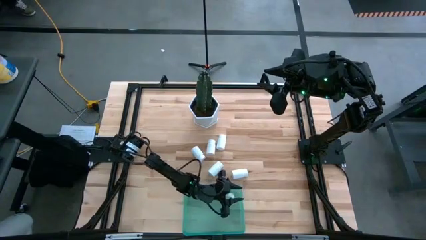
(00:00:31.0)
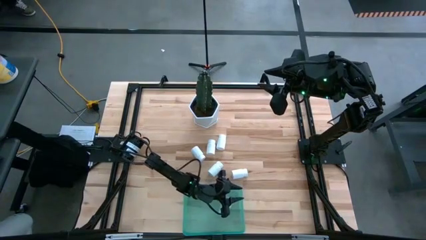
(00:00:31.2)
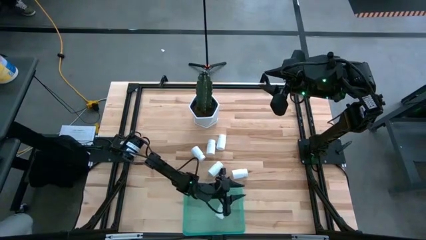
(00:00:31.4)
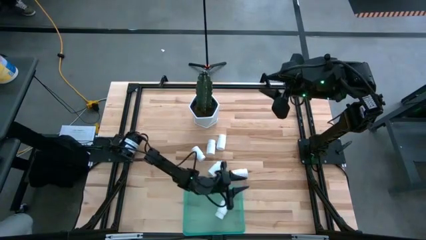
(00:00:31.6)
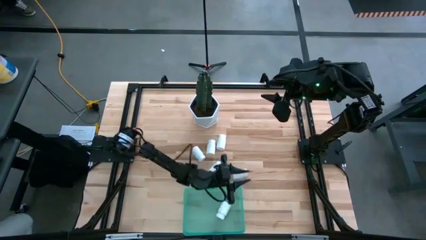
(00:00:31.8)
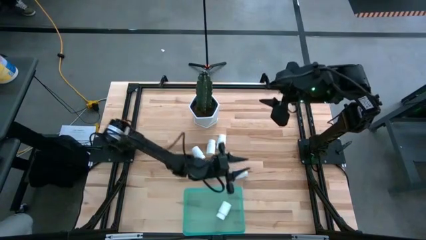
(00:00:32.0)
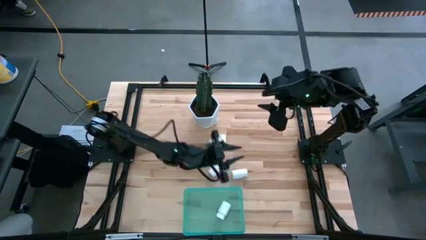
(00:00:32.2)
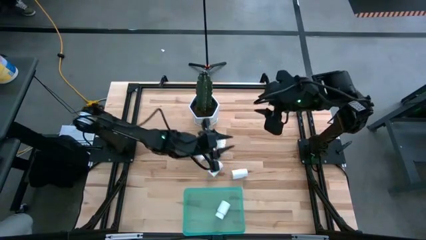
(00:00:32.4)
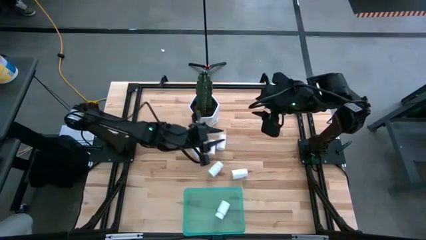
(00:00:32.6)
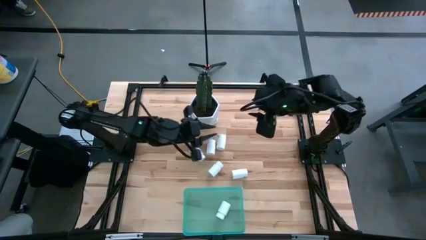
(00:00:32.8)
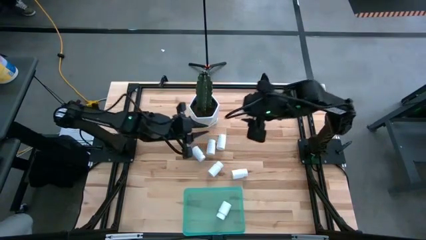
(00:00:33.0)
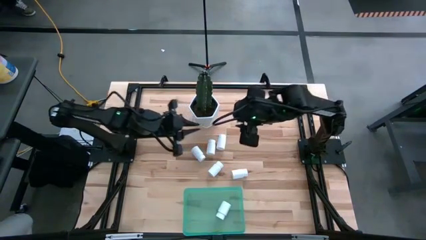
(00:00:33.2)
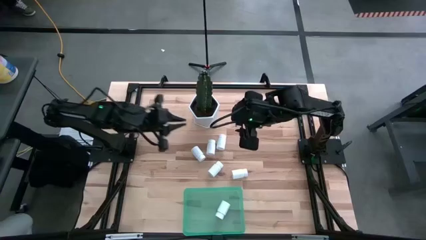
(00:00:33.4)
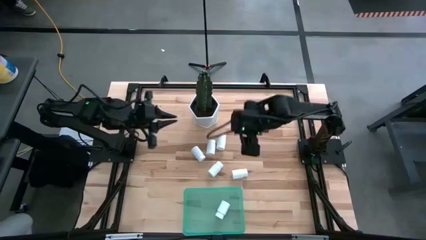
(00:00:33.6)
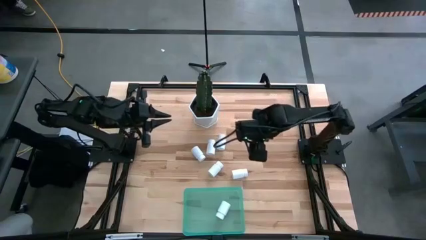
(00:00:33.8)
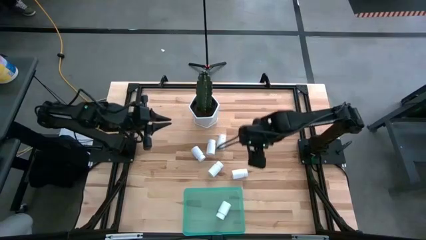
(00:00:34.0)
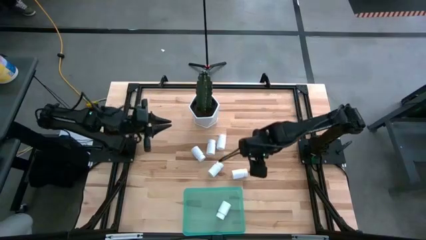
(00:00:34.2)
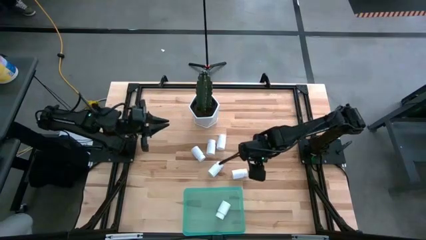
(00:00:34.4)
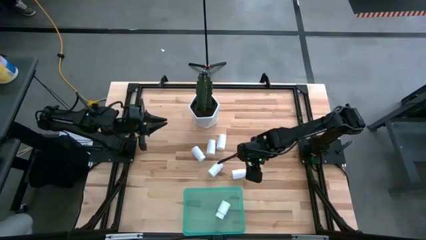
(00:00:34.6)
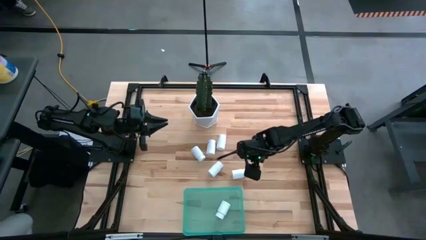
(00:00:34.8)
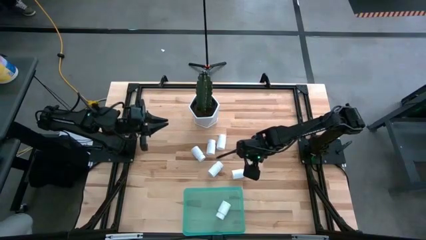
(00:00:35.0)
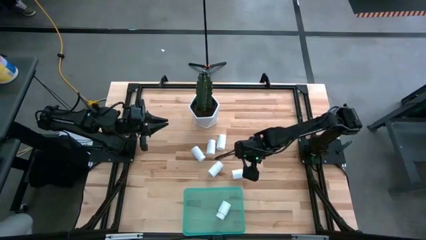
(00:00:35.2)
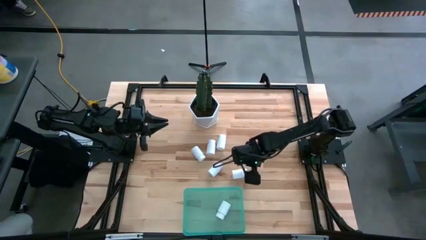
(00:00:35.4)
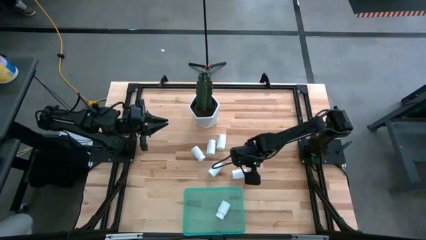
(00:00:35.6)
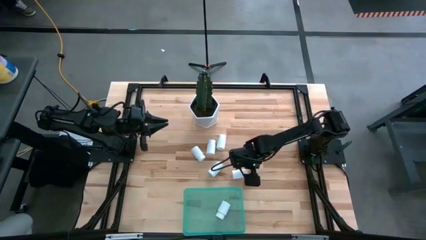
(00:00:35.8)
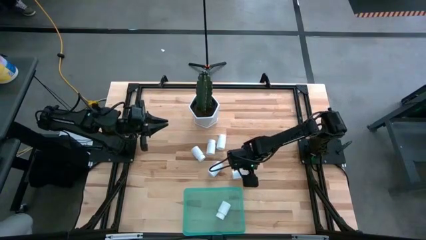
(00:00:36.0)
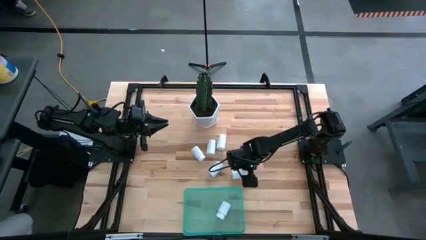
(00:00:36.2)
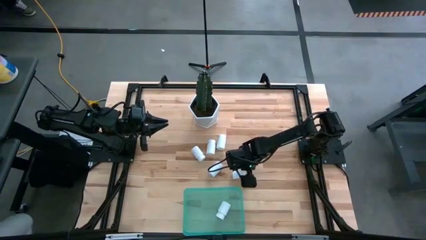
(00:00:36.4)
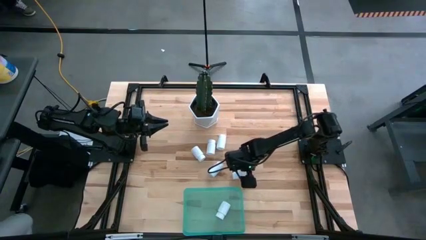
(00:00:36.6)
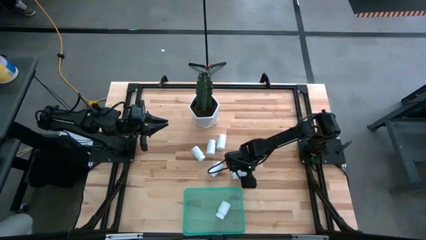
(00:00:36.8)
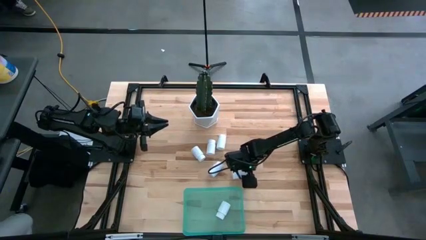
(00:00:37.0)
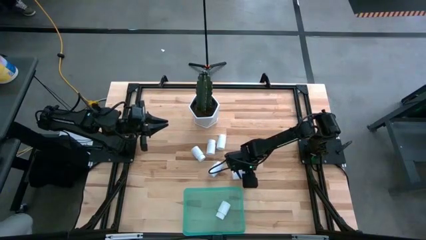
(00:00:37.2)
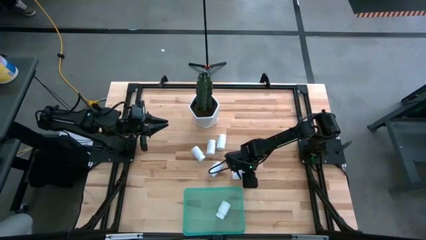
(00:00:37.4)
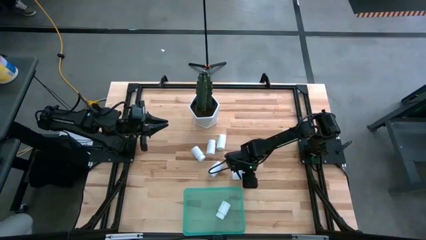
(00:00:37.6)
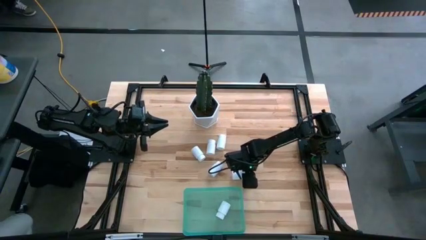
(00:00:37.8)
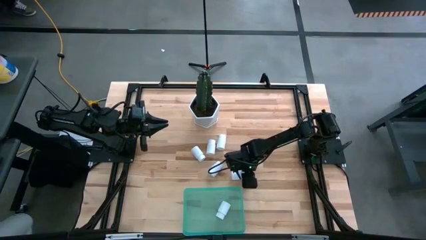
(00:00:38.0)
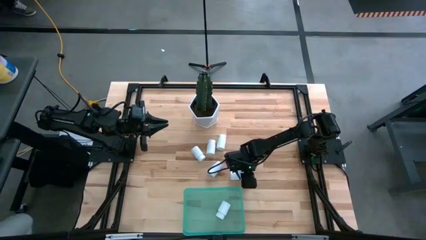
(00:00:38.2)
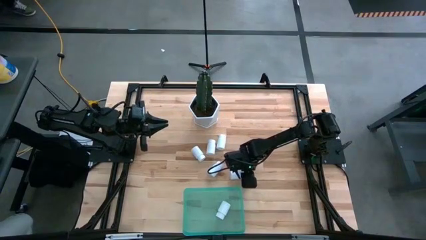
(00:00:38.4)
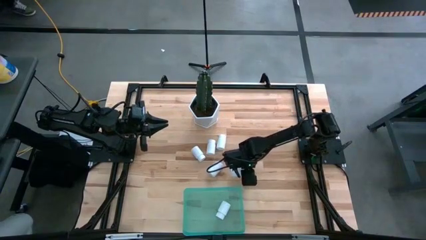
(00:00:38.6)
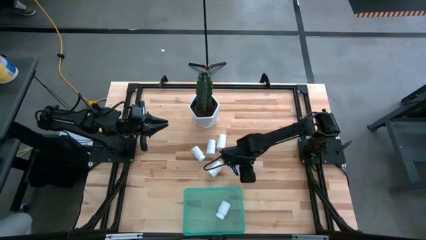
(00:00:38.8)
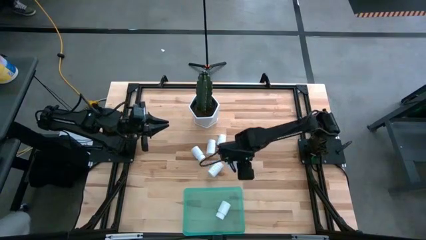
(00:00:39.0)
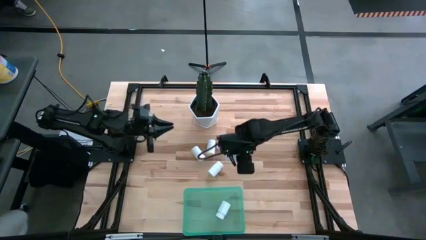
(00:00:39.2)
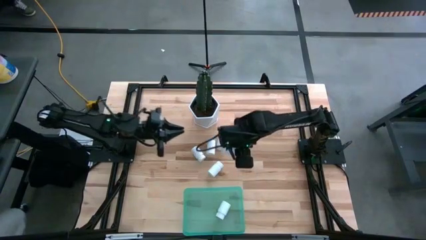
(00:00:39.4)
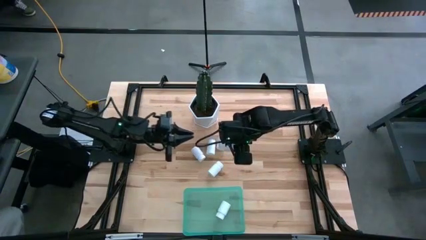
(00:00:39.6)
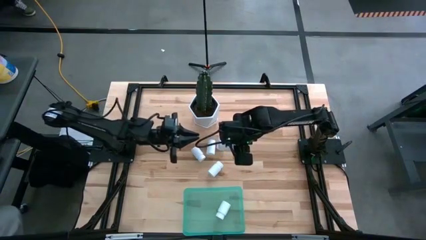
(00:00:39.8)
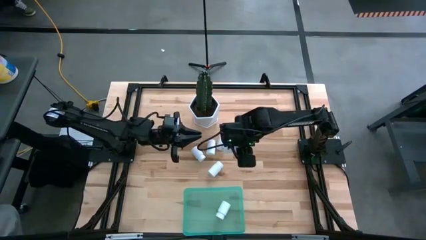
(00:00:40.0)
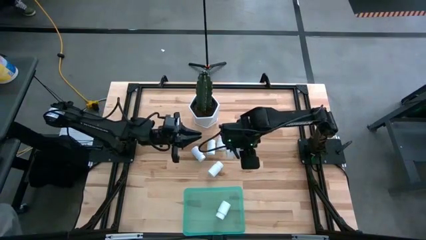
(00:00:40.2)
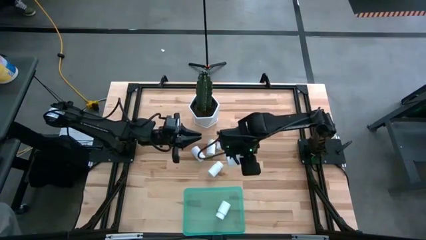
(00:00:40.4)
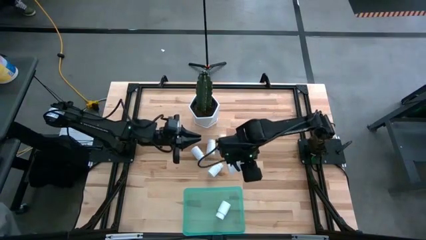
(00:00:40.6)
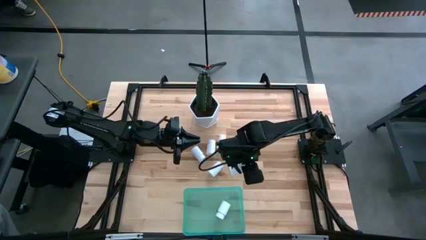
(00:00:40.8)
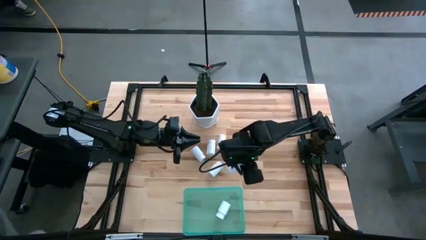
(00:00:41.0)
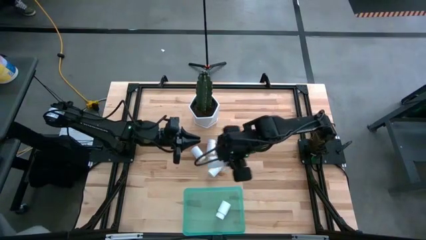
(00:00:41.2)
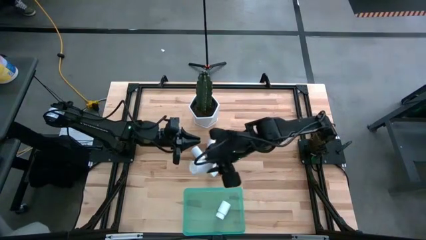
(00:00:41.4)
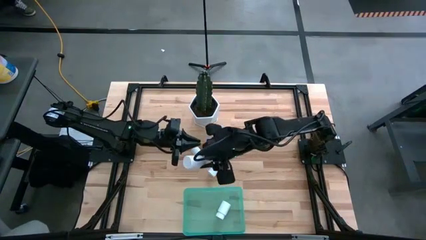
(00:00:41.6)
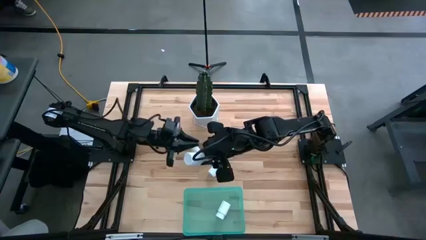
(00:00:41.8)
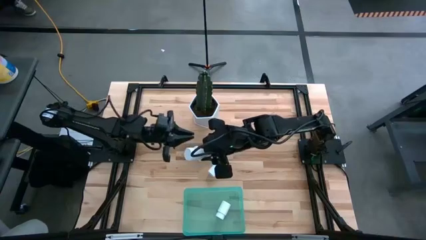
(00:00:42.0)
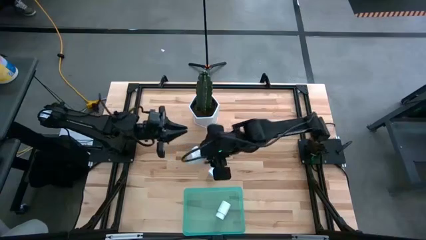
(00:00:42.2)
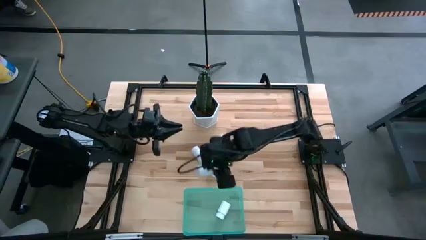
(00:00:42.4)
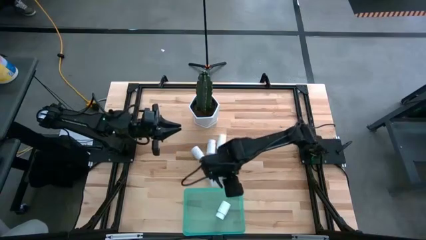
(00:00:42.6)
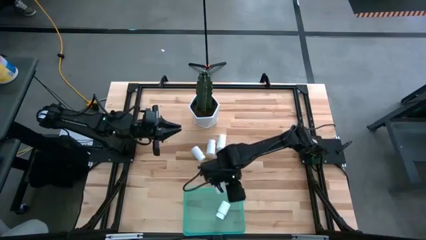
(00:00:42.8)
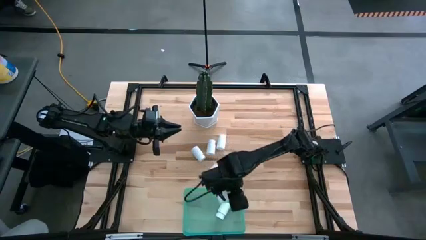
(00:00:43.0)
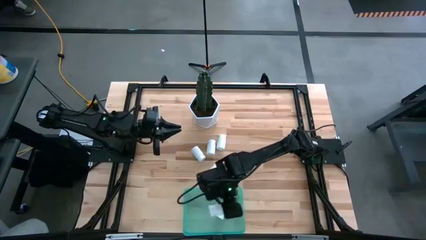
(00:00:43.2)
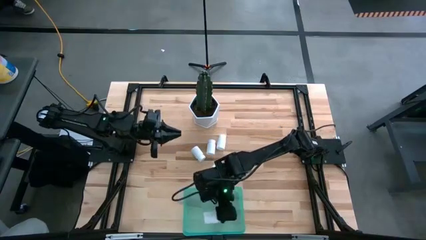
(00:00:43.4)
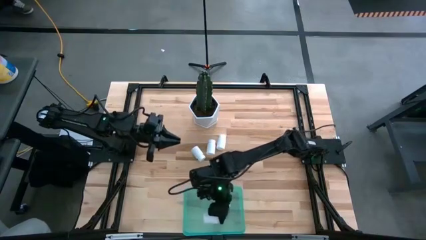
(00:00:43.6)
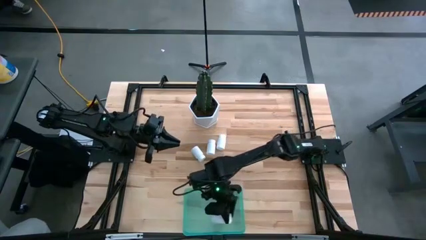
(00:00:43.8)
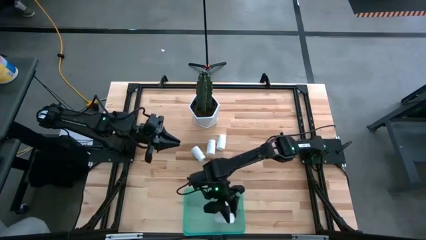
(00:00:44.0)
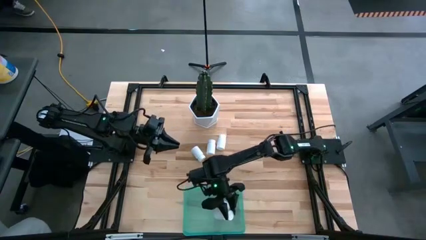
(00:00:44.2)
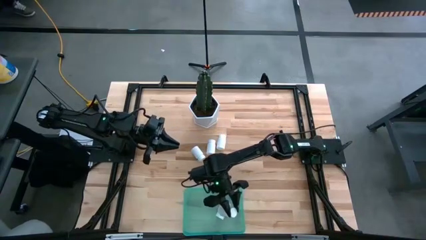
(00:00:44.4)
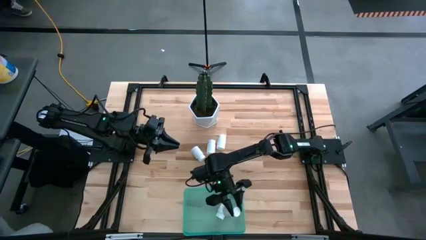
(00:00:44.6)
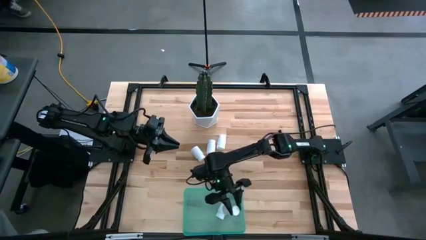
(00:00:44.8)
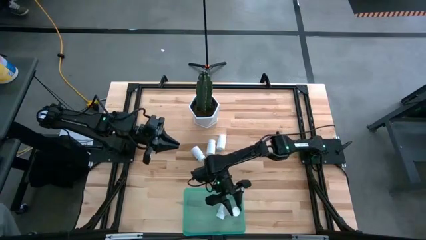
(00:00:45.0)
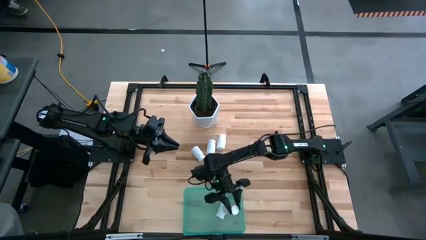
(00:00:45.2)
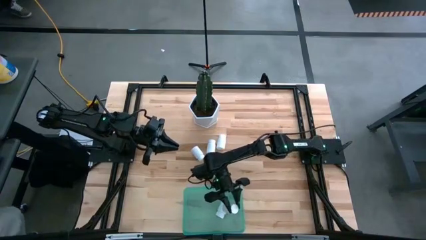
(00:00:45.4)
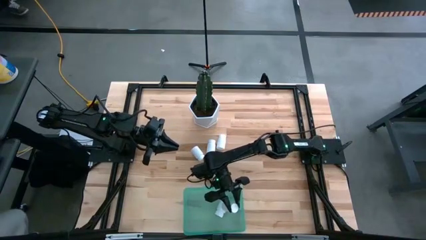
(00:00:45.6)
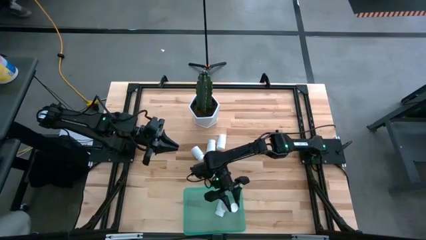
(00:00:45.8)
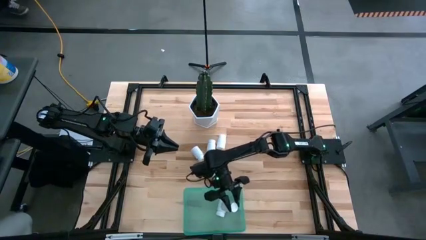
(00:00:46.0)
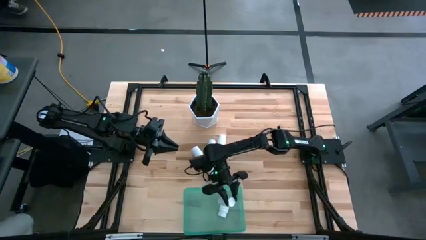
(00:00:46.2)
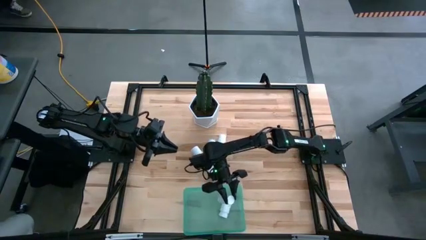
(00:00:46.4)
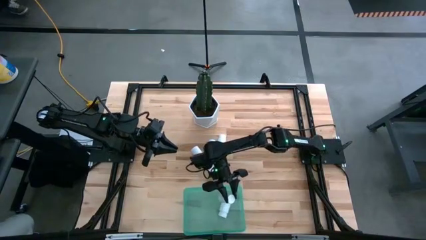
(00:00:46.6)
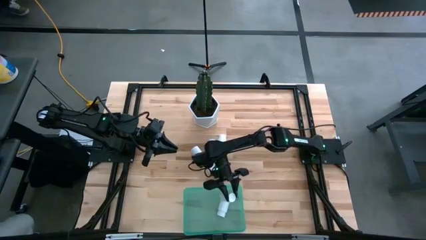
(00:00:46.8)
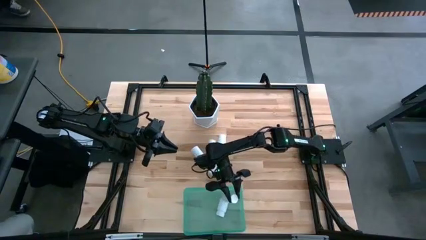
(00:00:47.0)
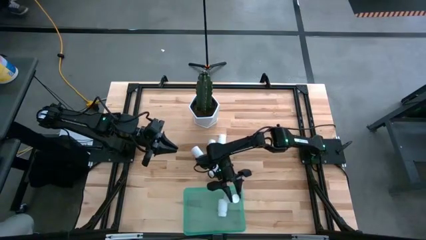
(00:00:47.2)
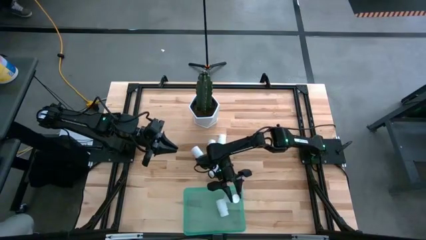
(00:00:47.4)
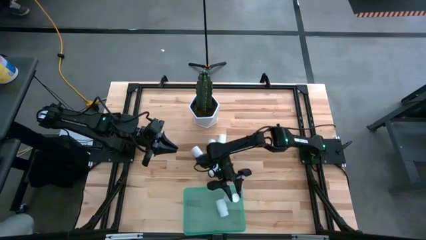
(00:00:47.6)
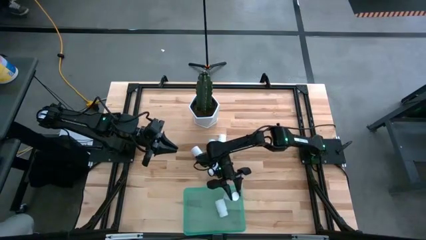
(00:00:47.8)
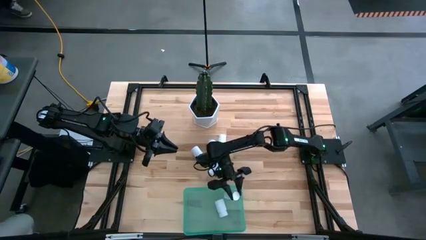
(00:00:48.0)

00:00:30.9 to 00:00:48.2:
Task: Pick and place pill bottles into a basket
Put the white pill bottle into the bin
